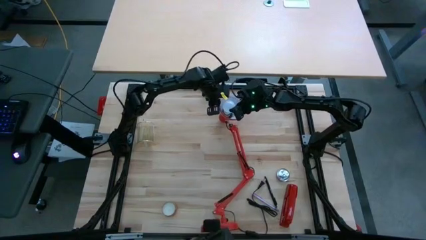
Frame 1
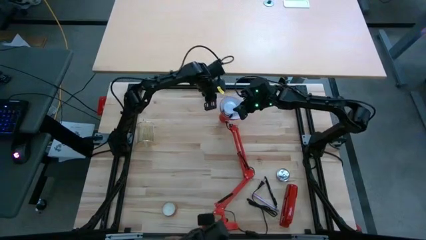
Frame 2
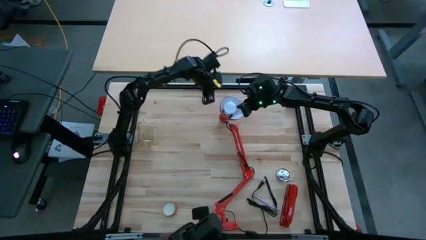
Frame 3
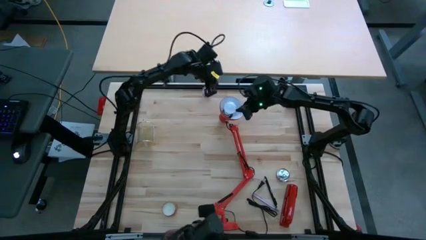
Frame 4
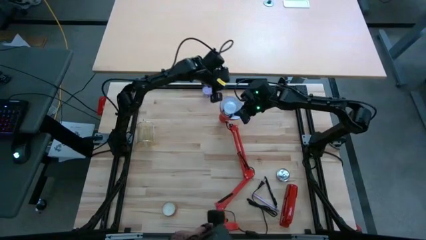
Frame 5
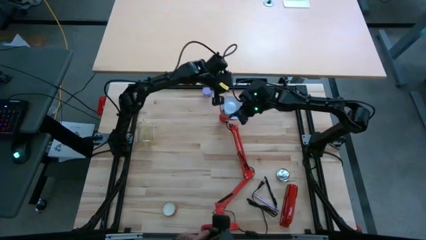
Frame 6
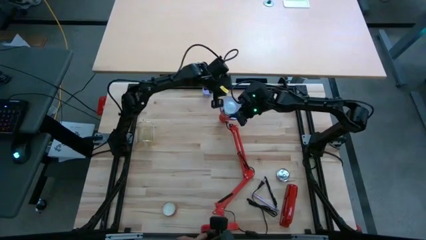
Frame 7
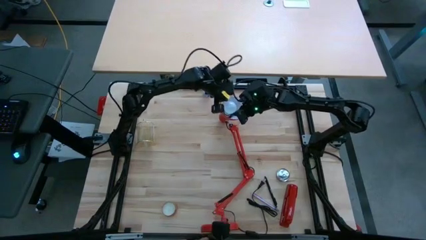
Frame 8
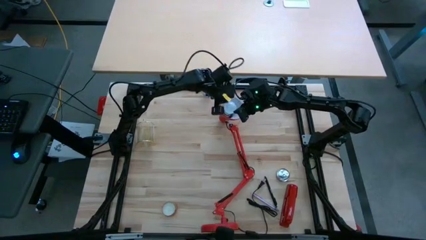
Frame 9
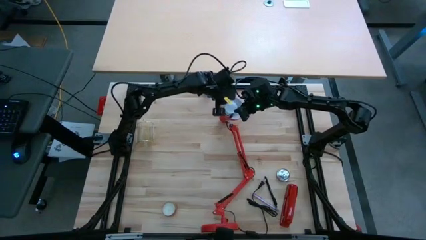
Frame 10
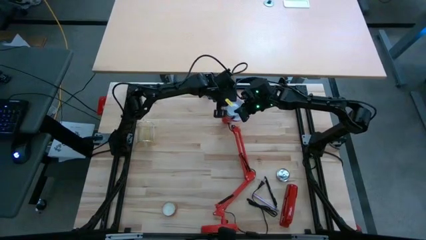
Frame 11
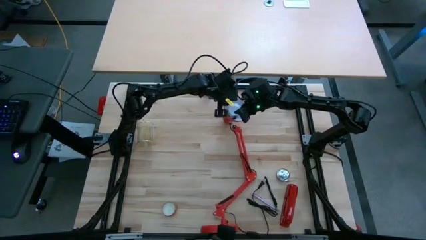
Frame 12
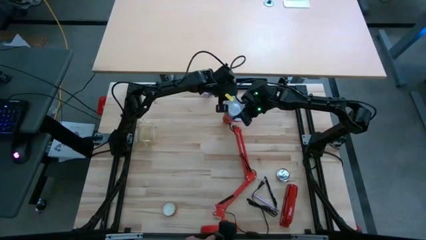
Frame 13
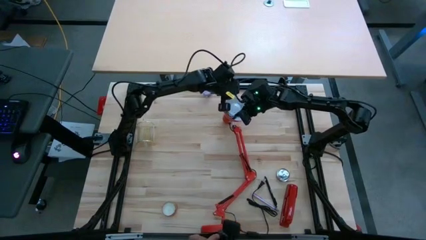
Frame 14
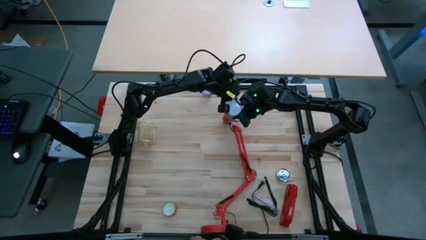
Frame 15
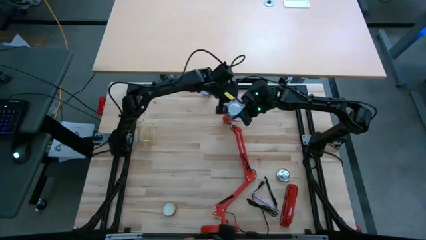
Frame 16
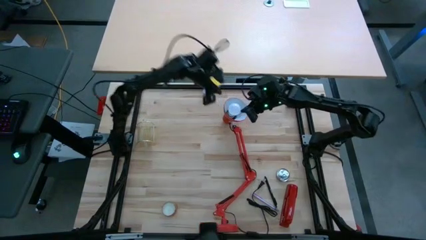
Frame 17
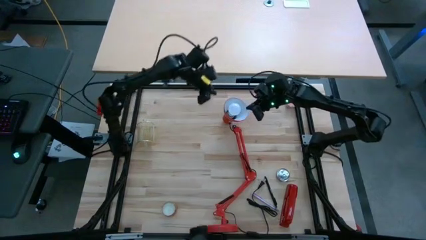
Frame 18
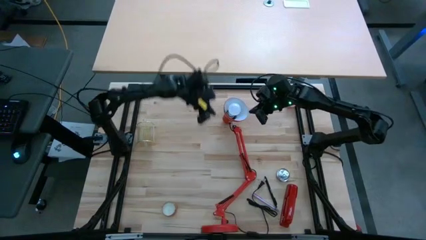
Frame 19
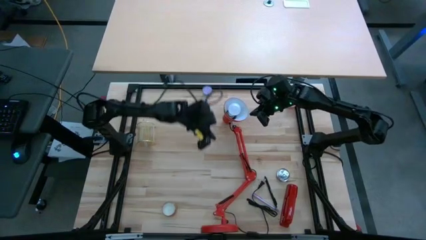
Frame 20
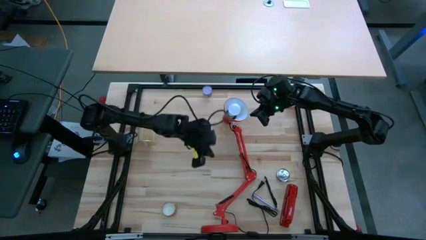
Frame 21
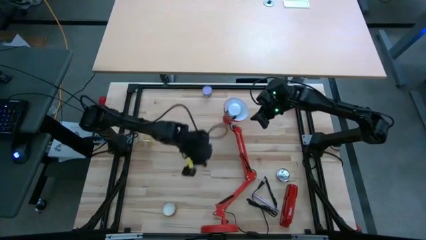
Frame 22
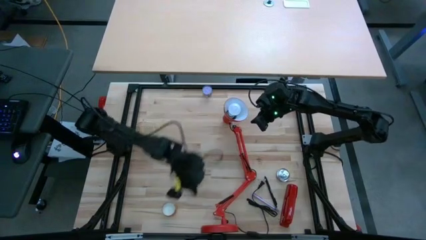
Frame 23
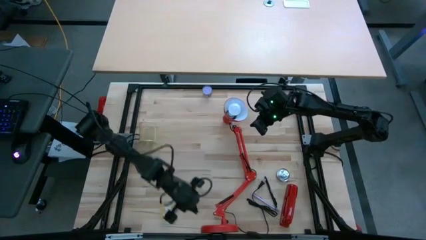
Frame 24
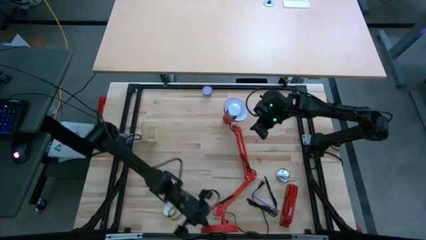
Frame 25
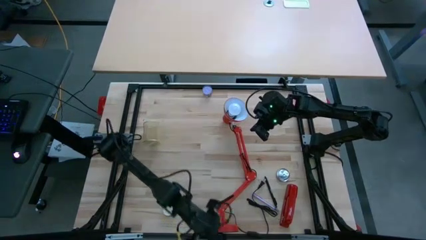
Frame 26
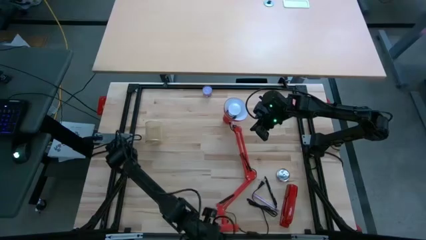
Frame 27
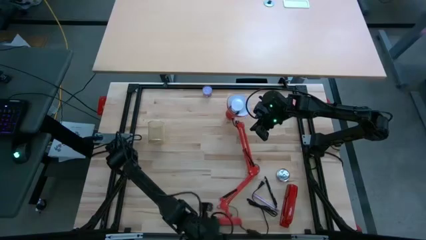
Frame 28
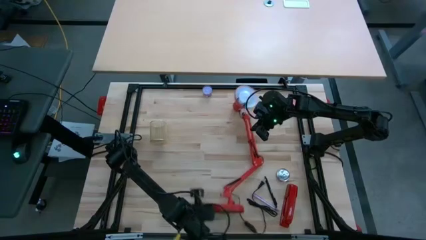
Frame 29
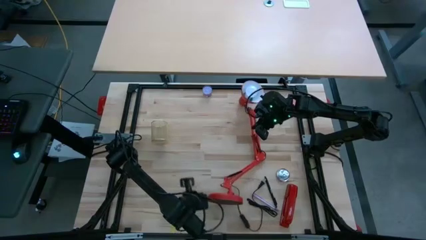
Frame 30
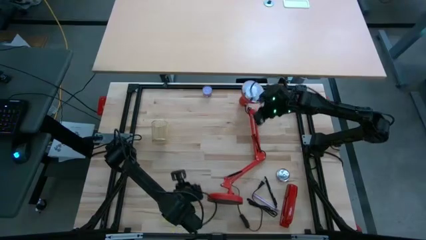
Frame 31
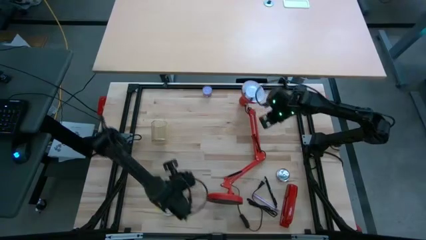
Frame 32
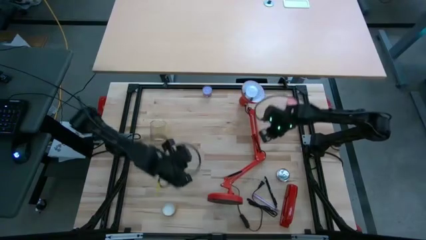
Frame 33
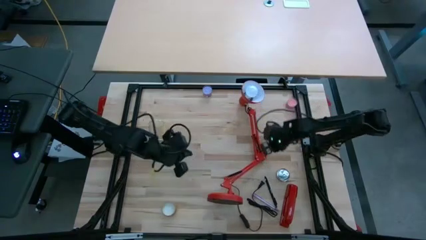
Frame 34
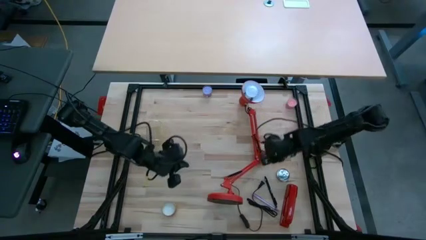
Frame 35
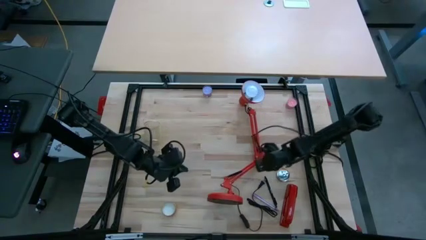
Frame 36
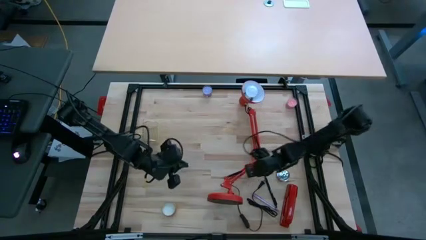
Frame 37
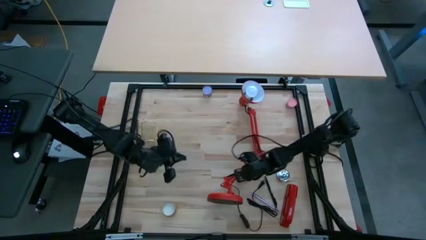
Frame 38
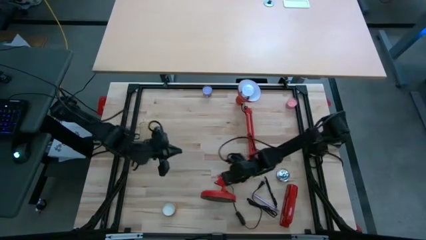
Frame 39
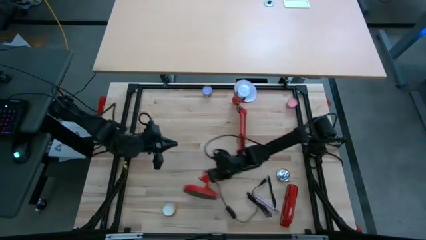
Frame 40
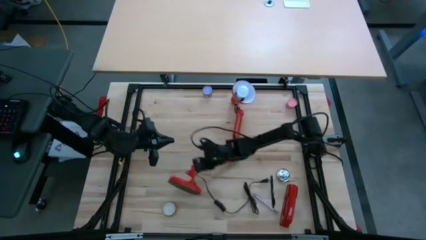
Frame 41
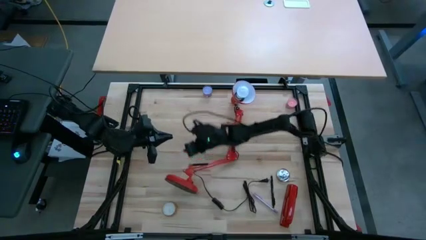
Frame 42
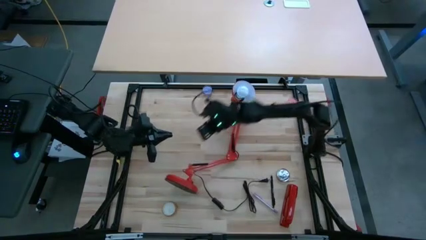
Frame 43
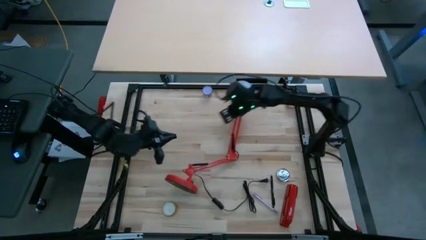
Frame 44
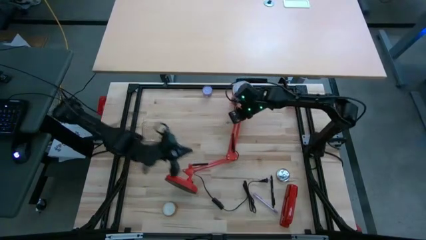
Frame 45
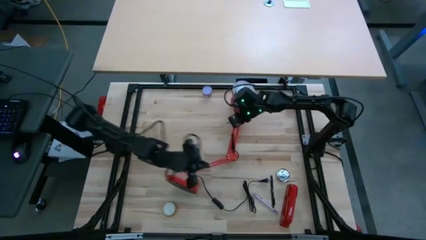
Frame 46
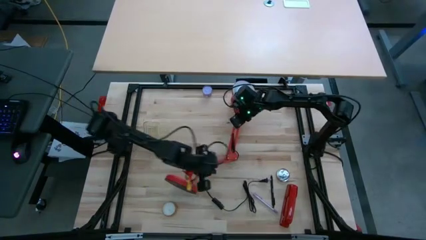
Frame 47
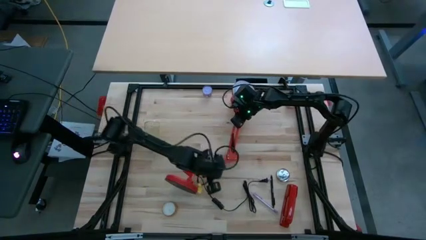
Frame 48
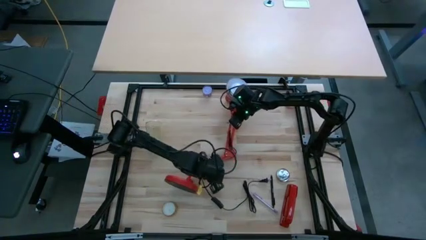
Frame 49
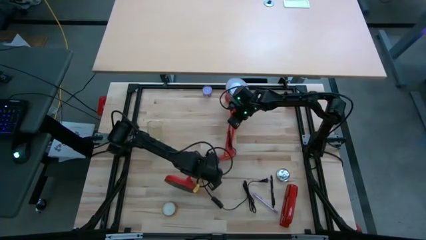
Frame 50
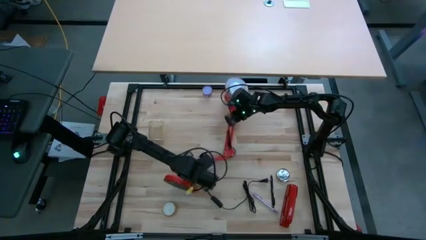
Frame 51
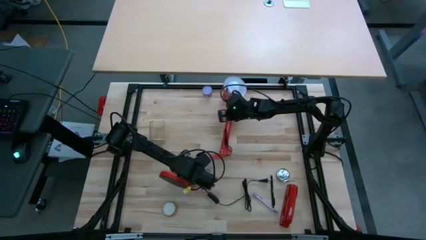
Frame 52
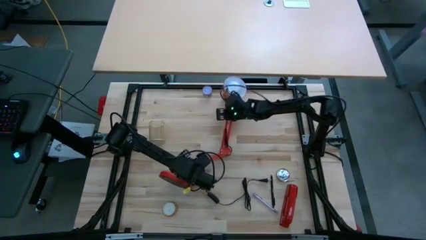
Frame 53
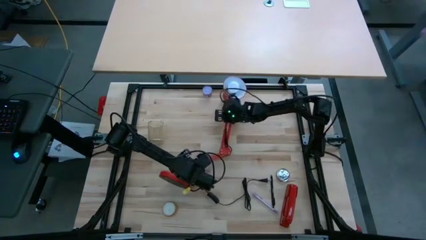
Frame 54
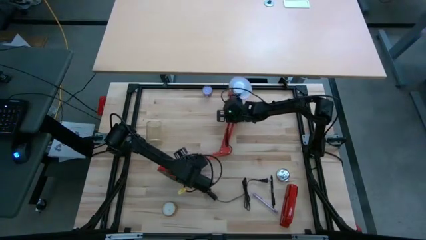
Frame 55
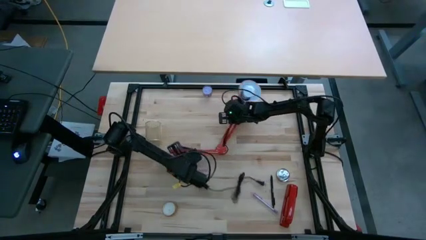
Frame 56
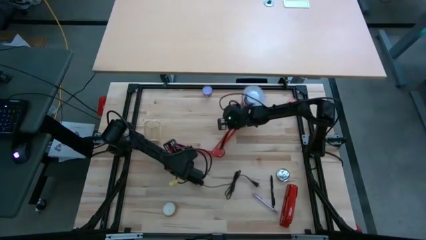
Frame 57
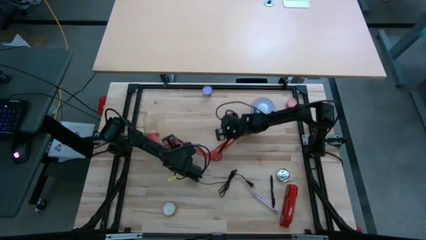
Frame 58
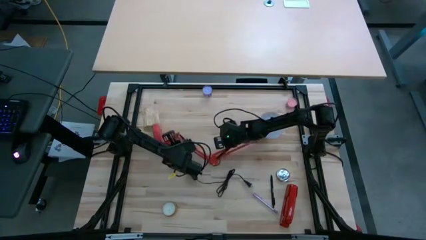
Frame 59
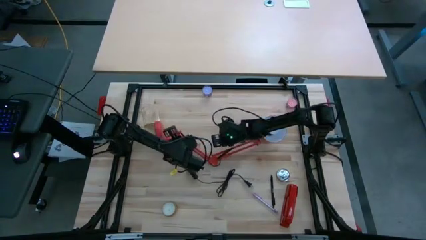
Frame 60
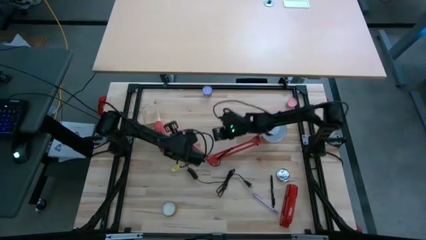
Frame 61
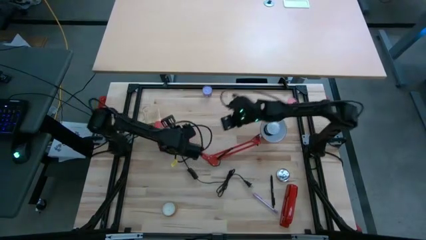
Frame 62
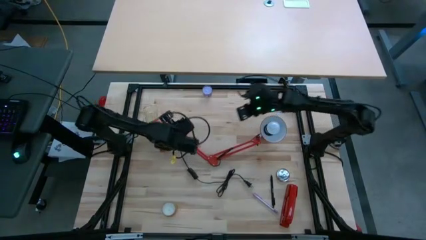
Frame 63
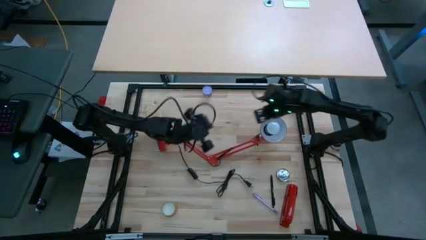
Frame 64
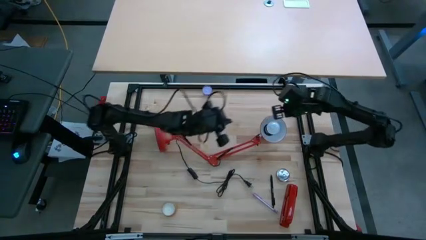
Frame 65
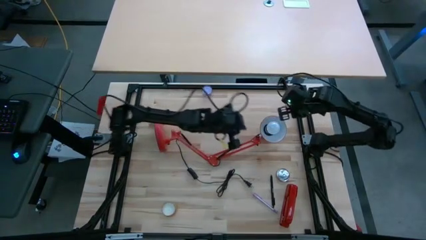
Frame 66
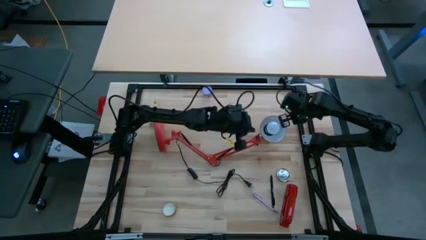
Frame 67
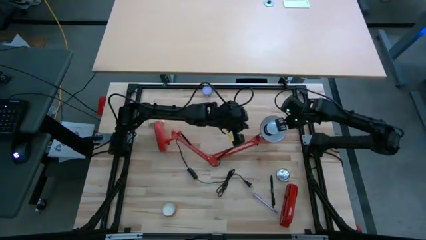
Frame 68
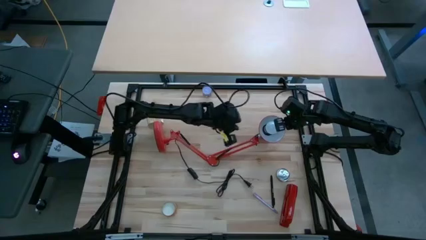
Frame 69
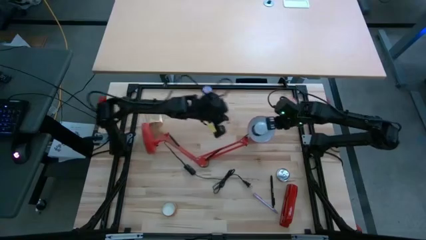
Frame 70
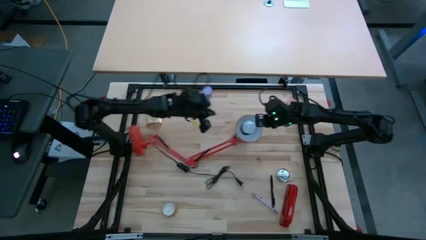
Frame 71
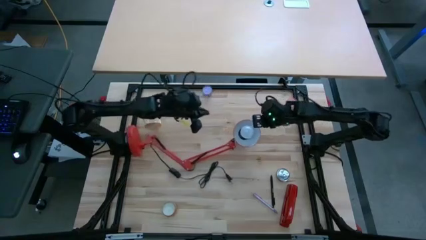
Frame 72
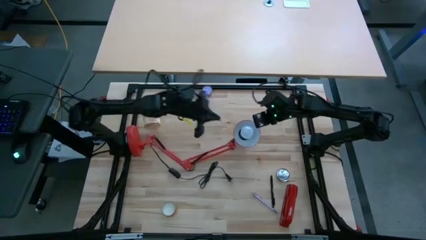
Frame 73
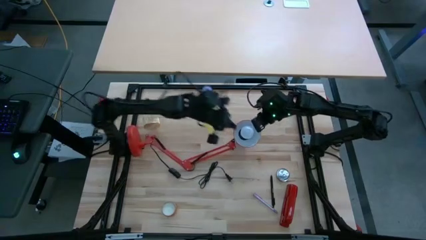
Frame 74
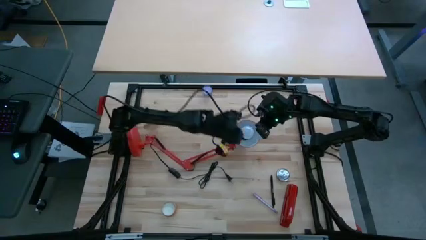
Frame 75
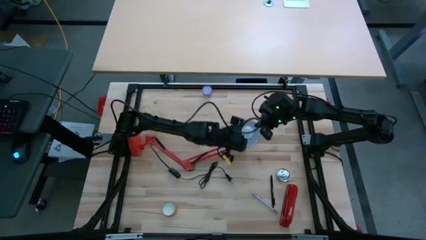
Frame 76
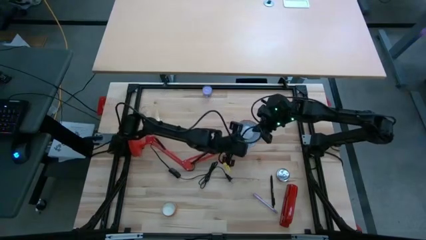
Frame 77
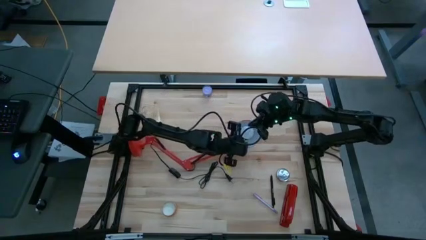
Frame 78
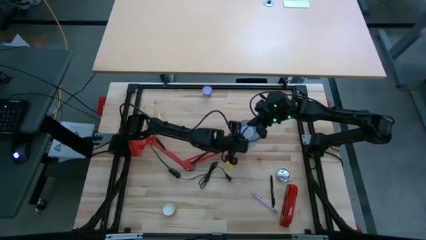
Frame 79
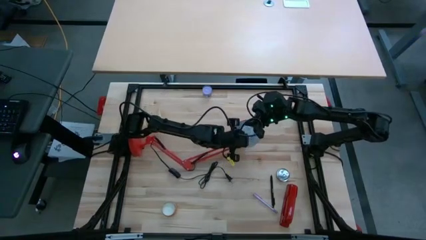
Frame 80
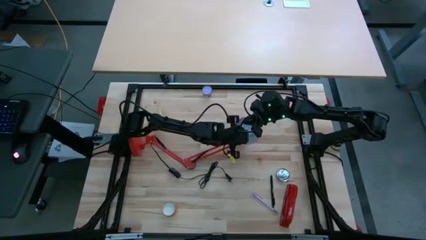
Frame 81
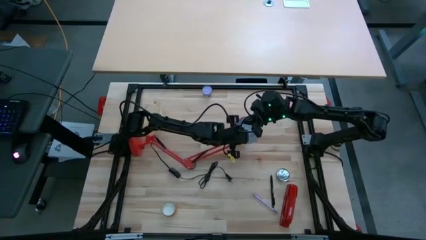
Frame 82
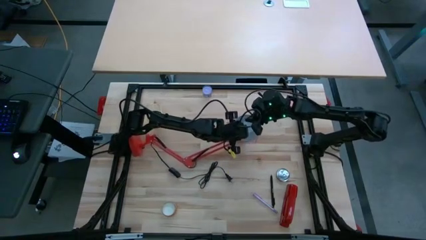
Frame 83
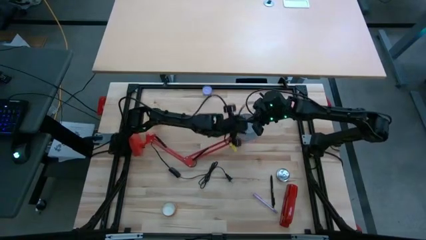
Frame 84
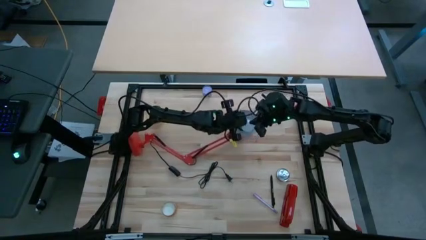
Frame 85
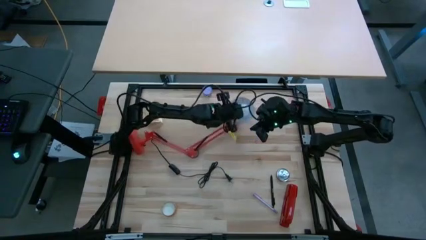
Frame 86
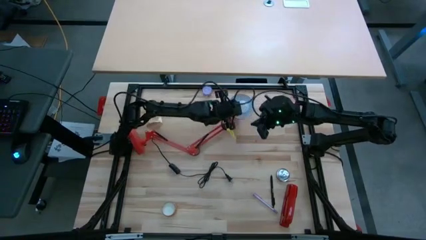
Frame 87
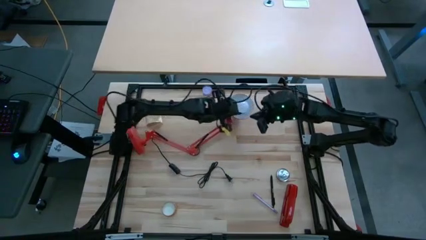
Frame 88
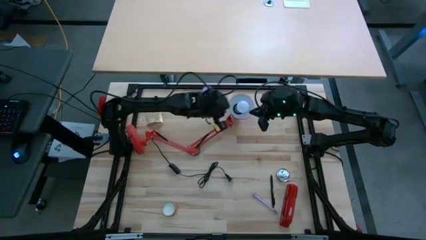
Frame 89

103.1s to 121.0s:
Task: Screw lightbulb
Remove the white lightbulb from the desk lamp
